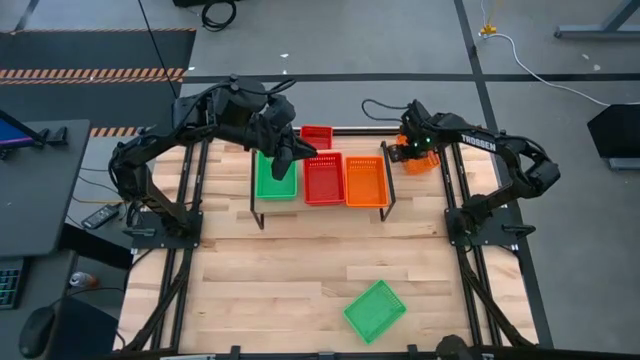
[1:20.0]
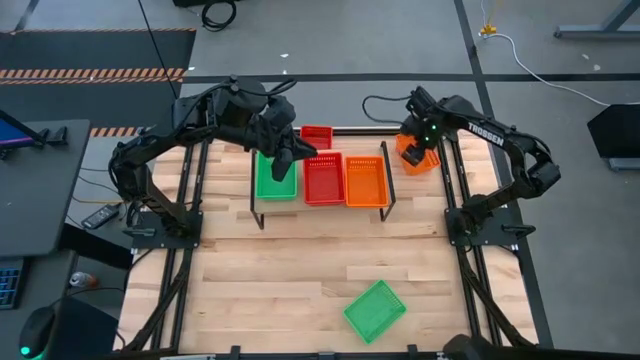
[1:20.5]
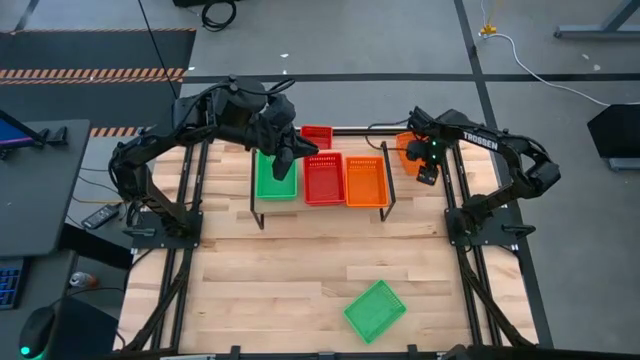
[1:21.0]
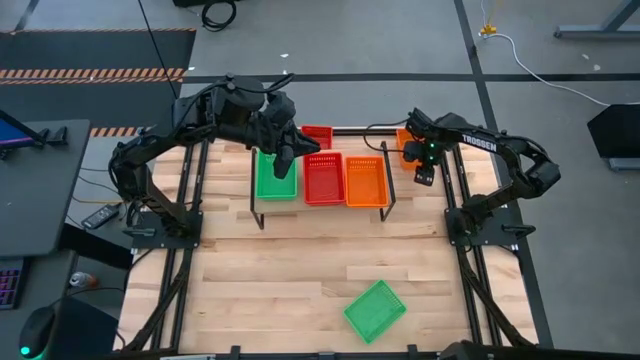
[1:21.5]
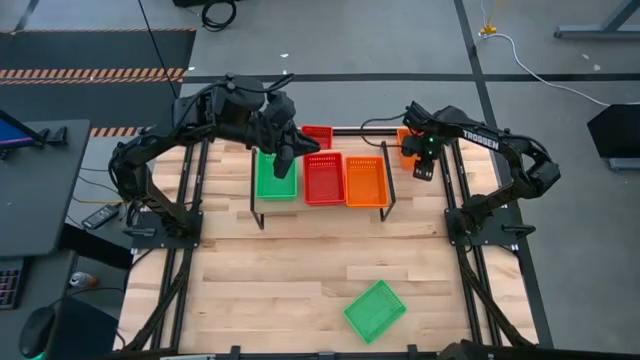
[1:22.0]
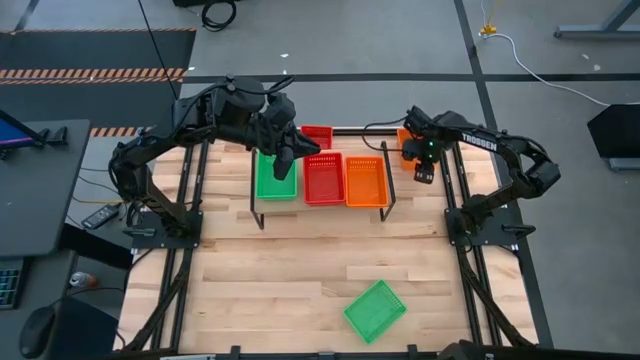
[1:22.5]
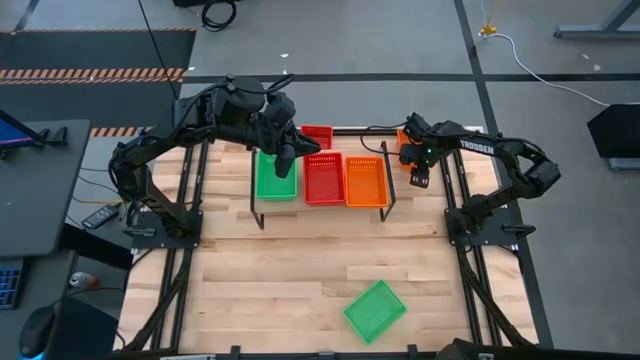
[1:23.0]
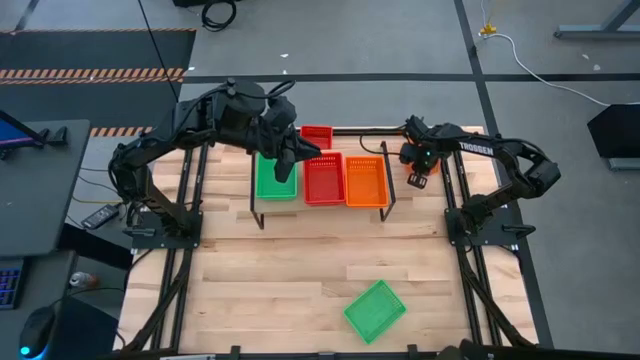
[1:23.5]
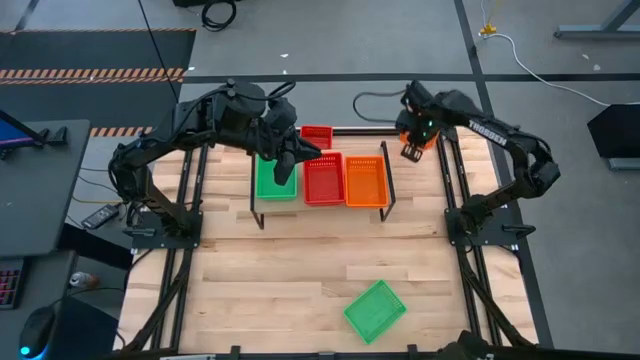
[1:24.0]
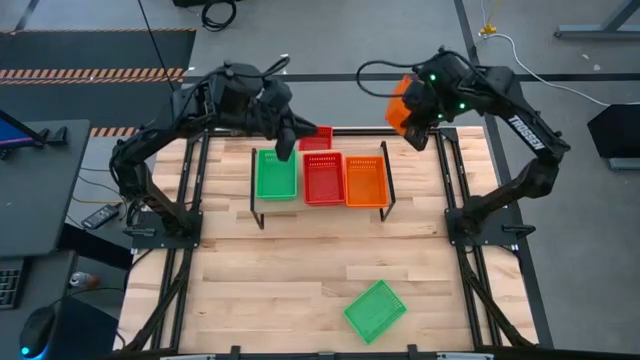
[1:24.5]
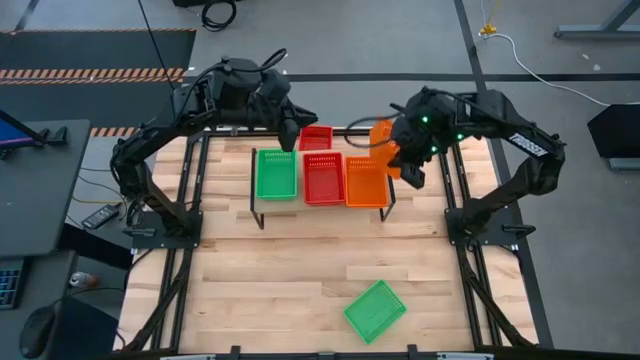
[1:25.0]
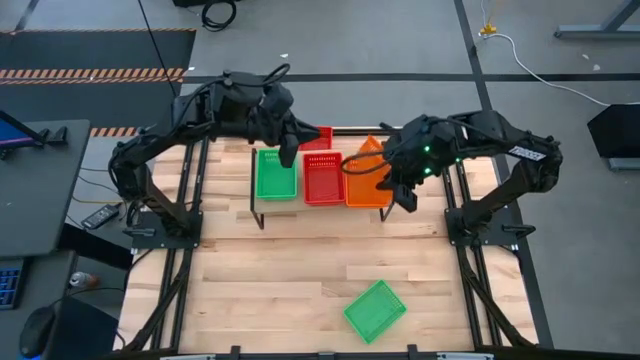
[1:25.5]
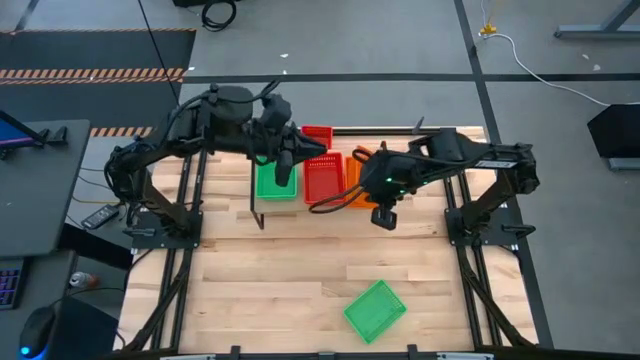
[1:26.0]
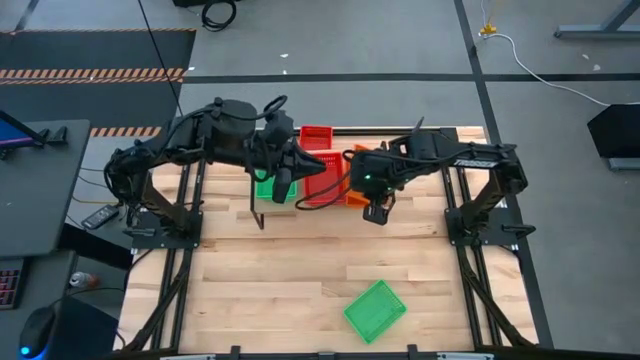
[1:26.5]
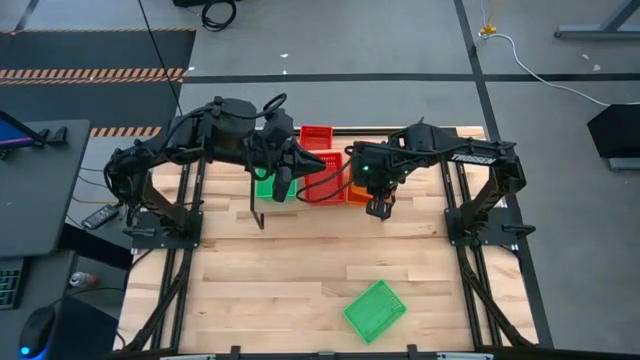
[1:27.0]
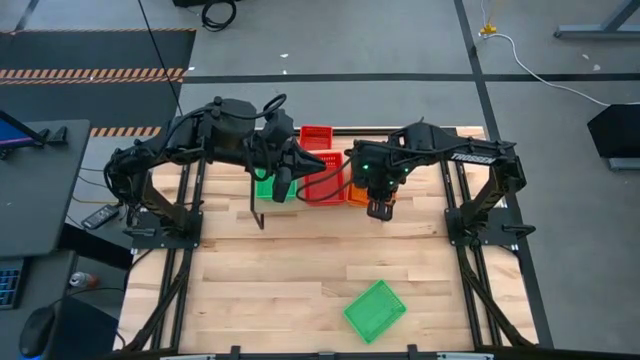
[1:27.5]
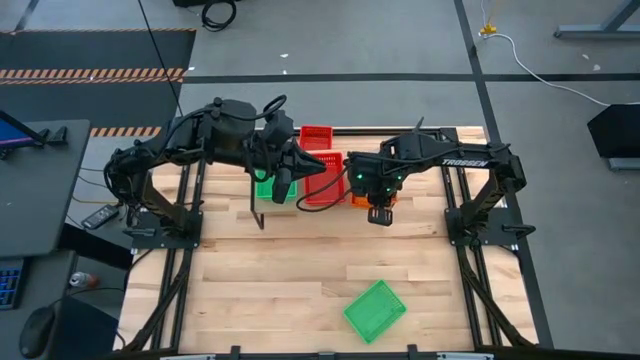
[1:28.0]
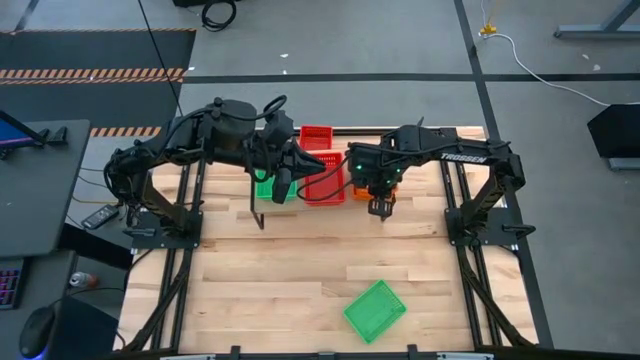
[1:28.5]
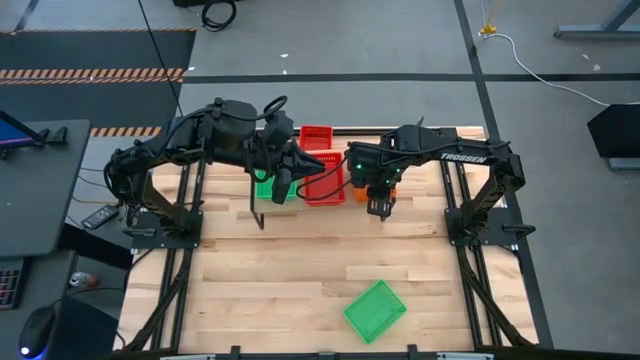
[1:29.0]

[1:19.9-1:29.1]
Task: Stack baskets on shelf by color
Stack the orange bin on top of the other stacked orange bin on the shelf

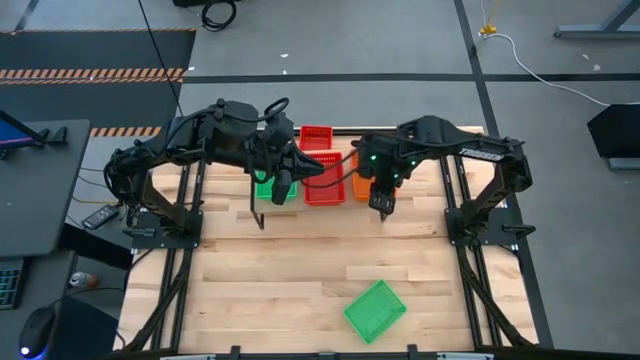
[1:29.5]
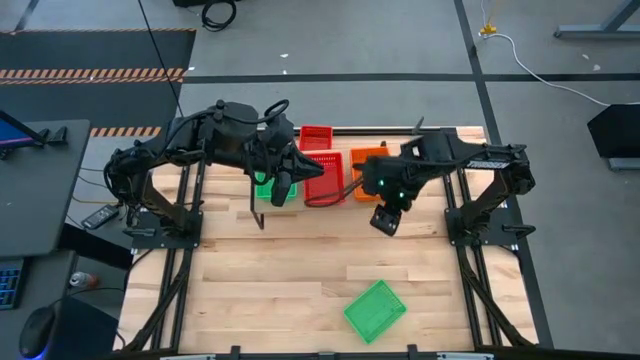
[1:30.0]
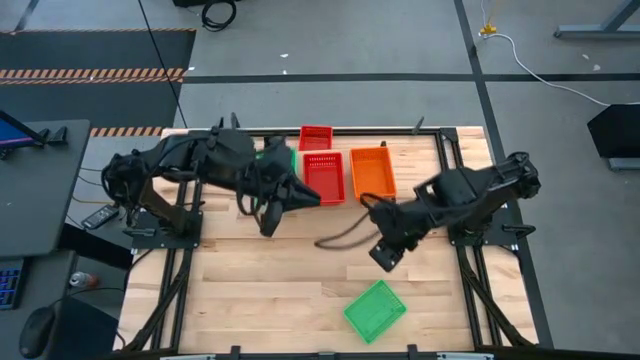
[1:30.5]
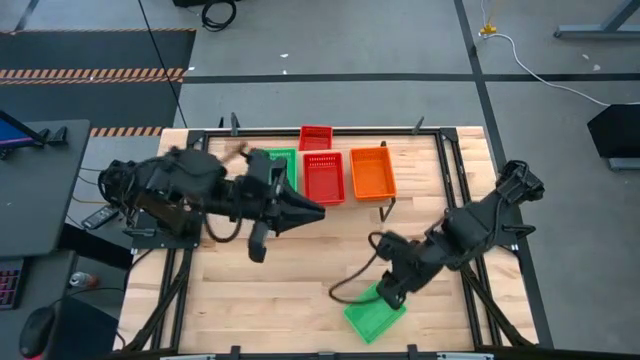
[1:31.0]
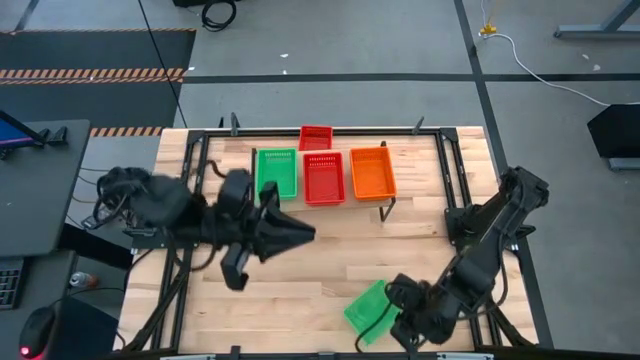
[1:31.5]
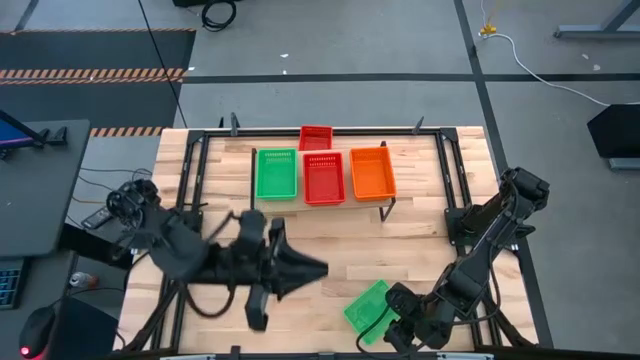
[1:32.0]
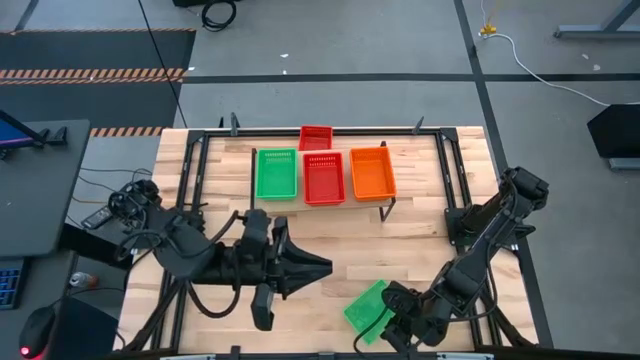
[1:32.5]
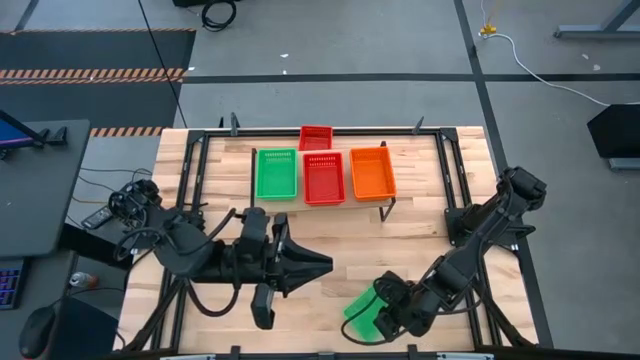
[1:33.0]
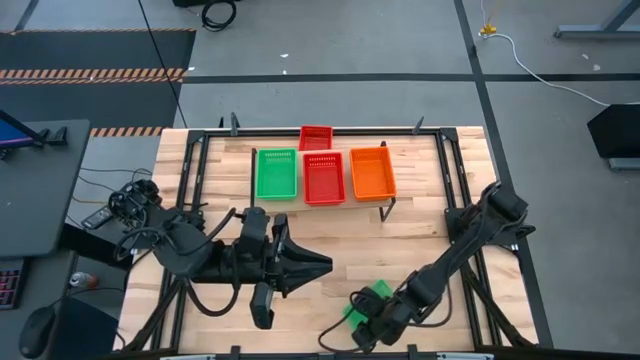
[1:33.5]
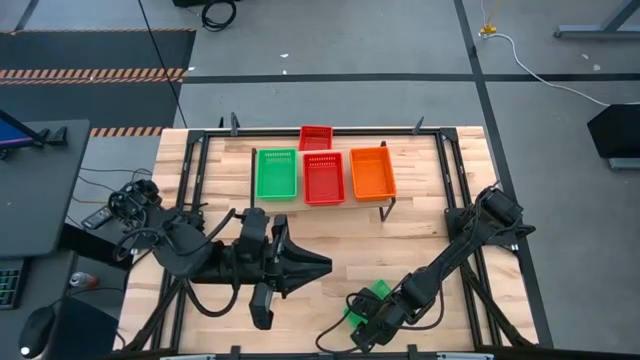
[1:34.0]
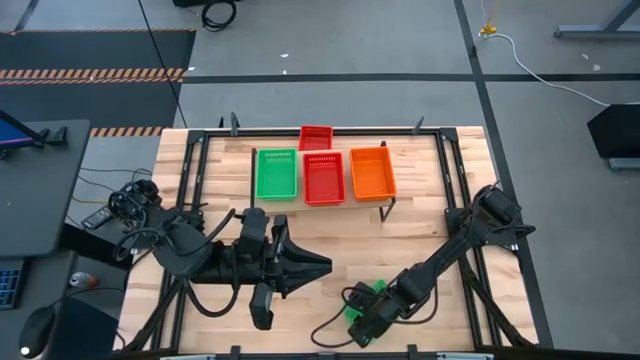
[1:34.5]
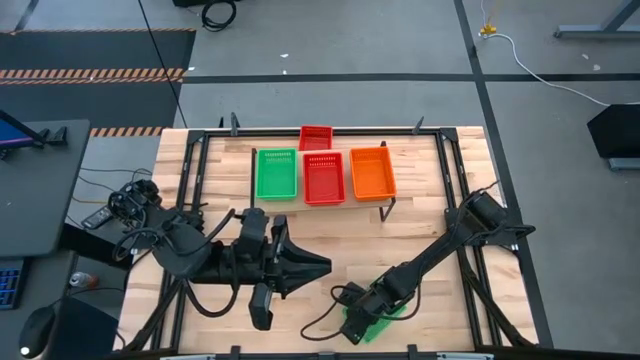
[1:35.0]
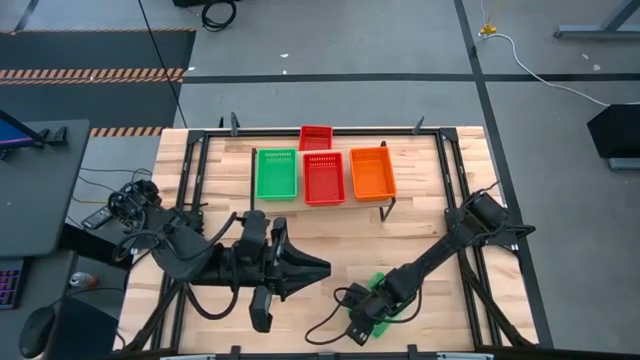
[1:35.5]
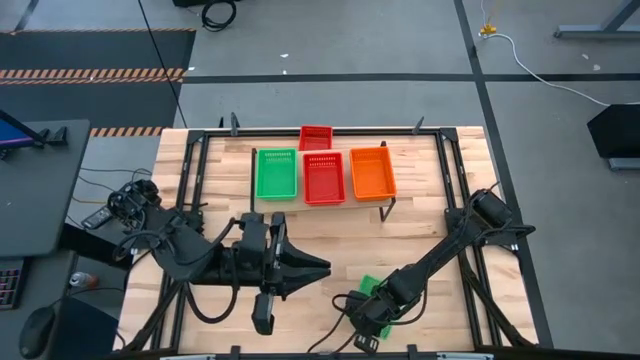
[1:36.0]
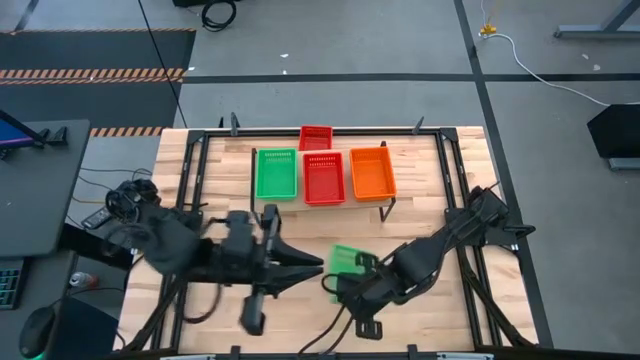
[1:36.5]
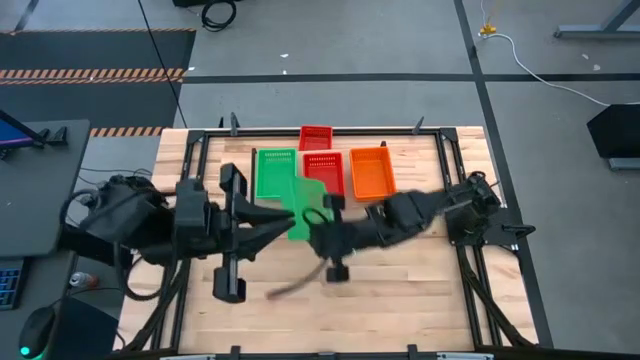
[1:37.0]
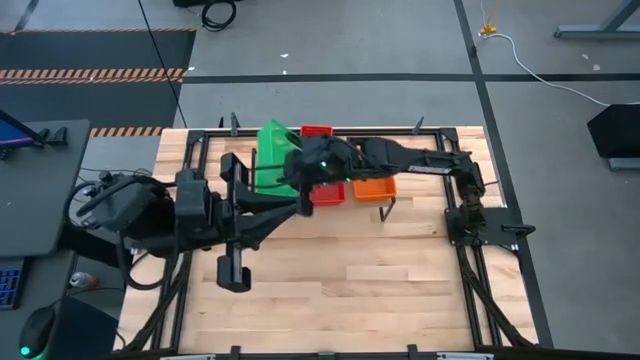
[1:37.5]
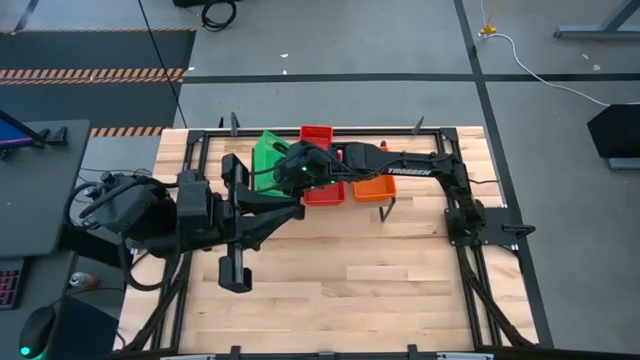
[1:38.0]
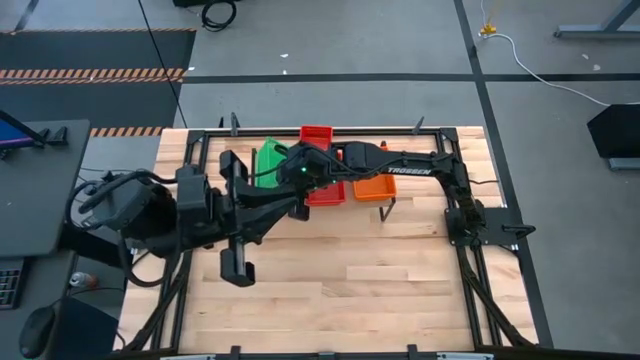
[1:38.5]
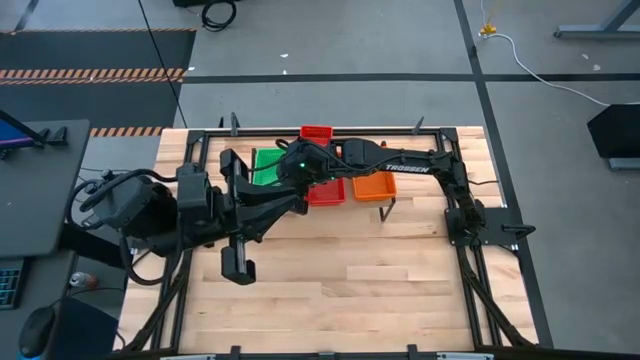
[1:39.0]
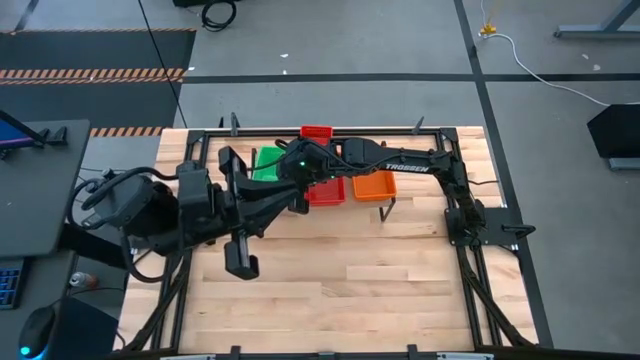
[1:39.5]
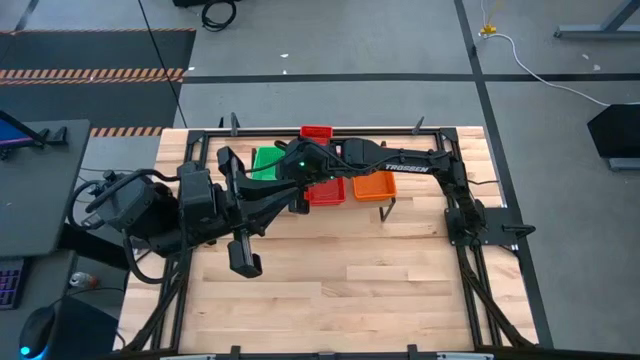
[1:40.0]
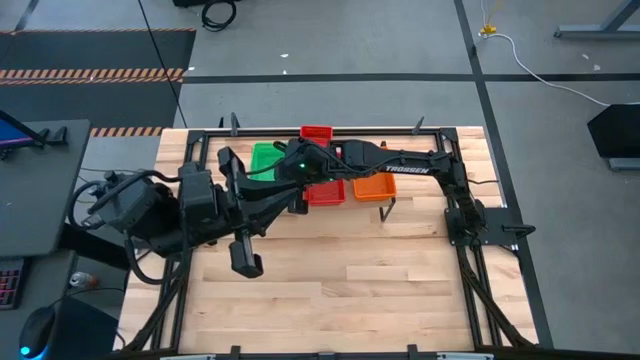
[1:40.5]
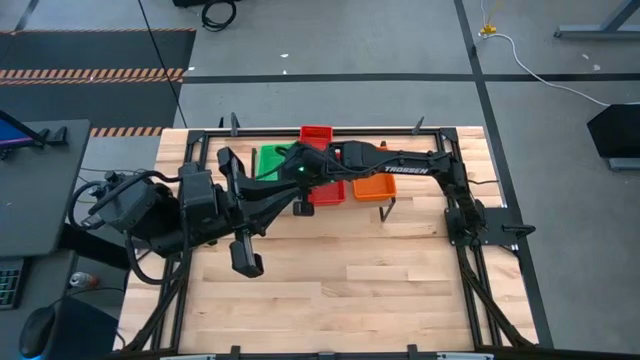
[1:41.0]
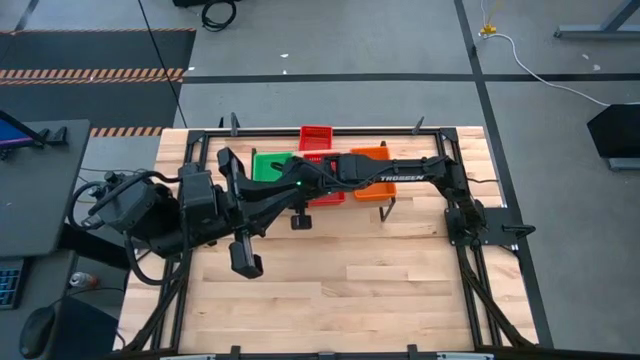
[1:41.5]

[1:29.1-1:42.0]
Stack the green bin on top of the other stacked green bins on the shelf
